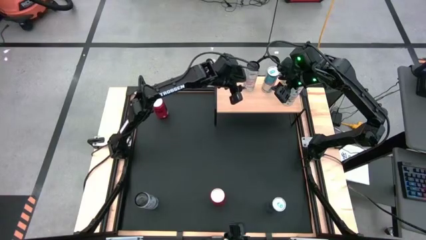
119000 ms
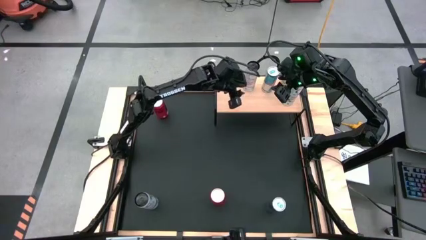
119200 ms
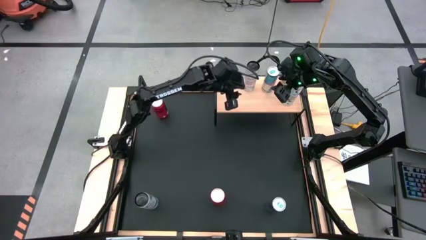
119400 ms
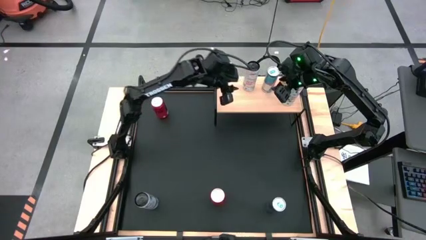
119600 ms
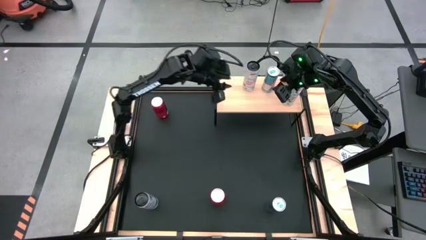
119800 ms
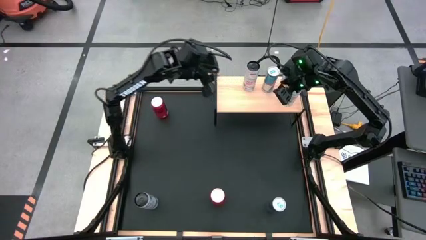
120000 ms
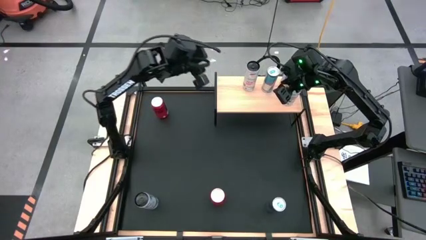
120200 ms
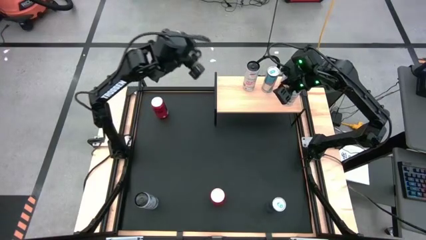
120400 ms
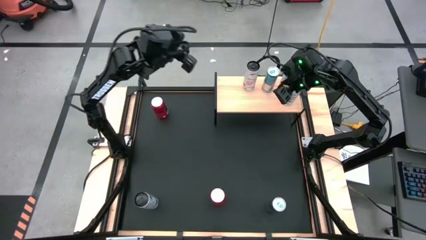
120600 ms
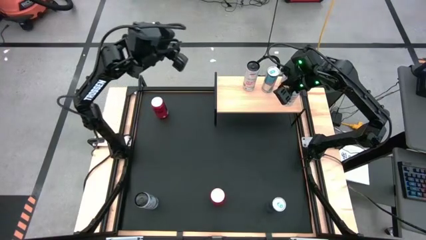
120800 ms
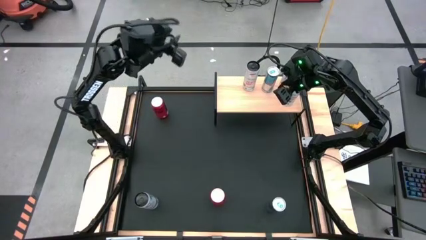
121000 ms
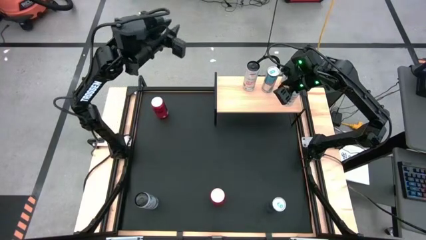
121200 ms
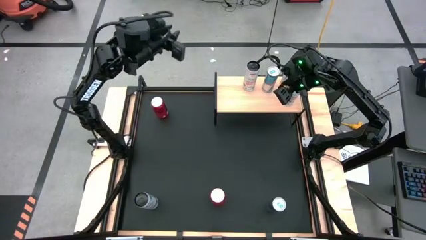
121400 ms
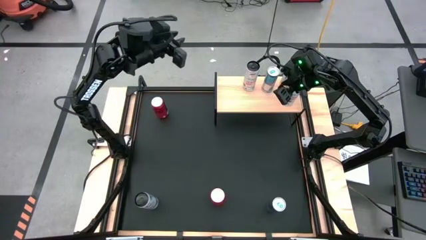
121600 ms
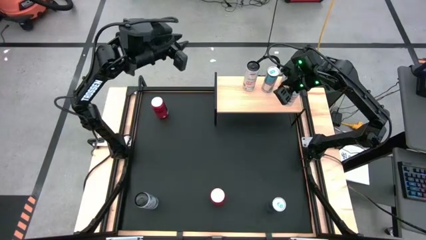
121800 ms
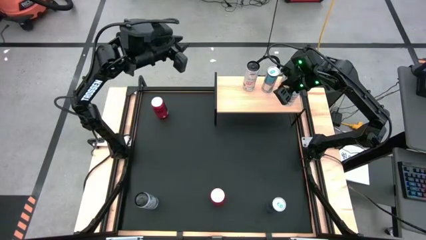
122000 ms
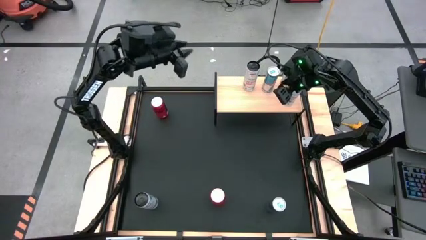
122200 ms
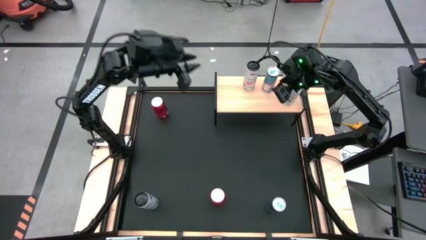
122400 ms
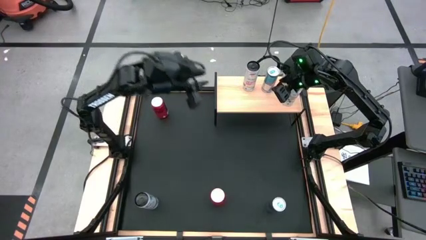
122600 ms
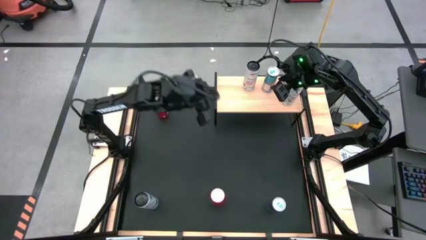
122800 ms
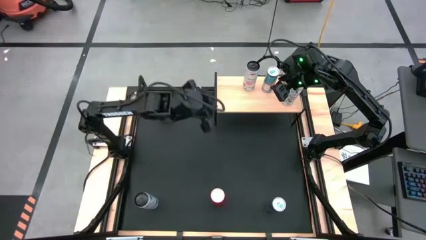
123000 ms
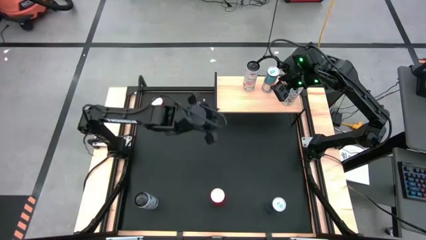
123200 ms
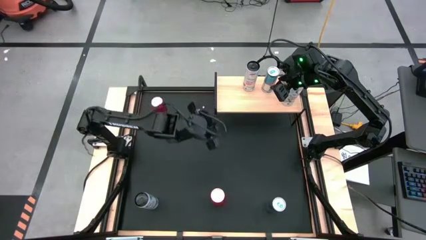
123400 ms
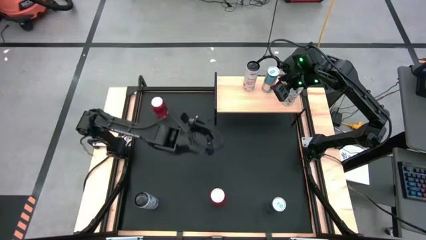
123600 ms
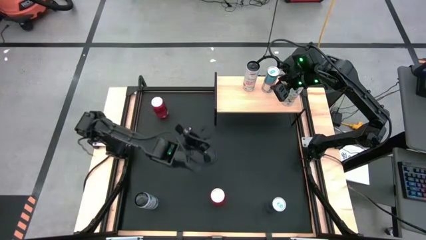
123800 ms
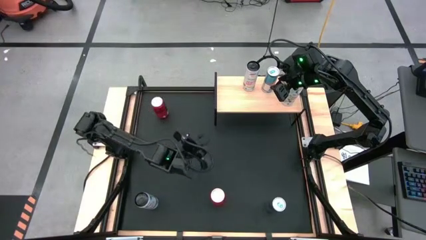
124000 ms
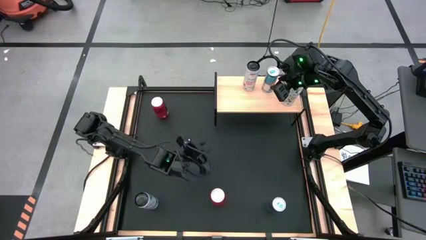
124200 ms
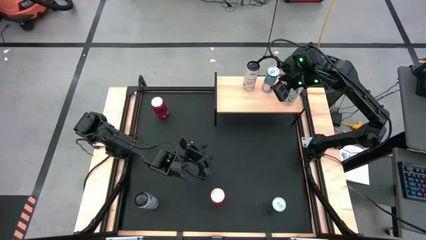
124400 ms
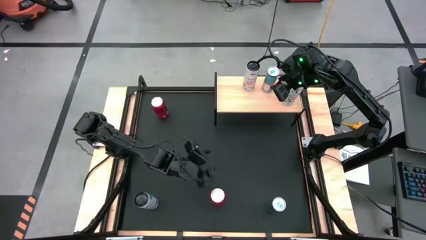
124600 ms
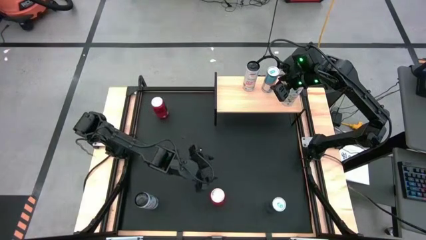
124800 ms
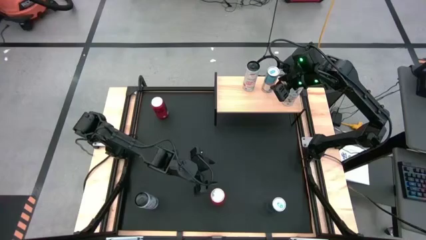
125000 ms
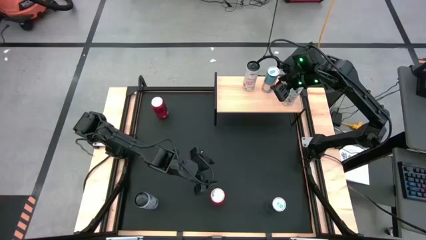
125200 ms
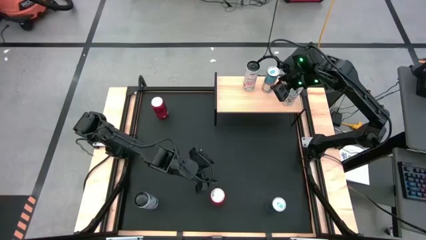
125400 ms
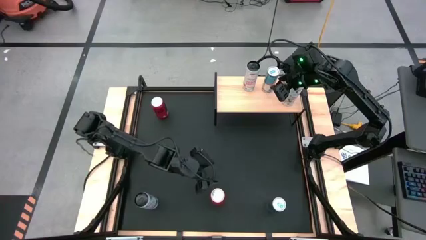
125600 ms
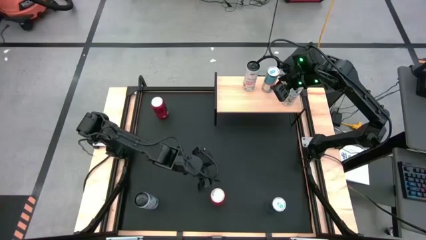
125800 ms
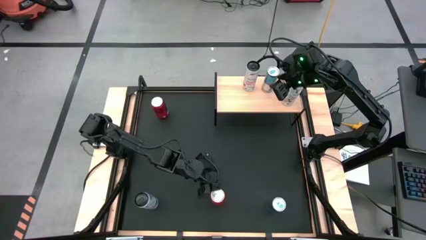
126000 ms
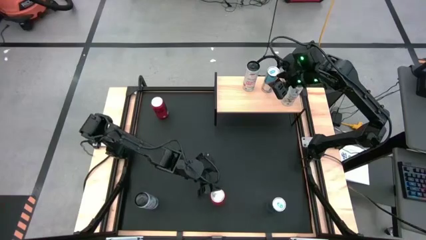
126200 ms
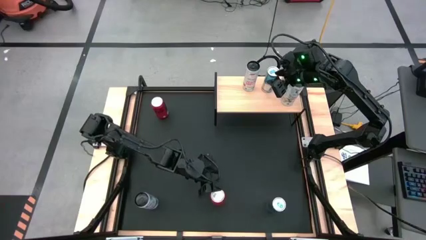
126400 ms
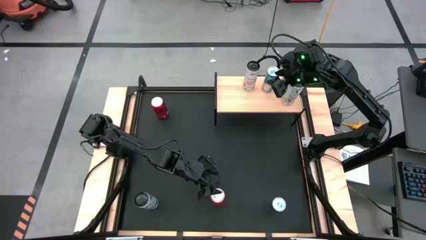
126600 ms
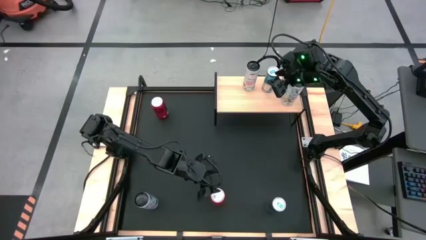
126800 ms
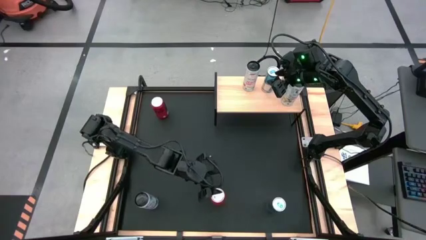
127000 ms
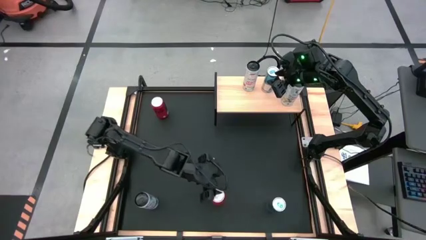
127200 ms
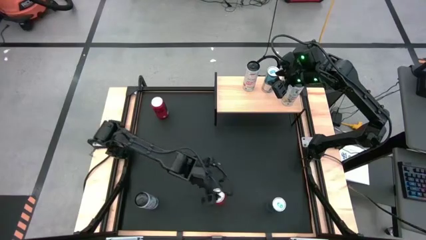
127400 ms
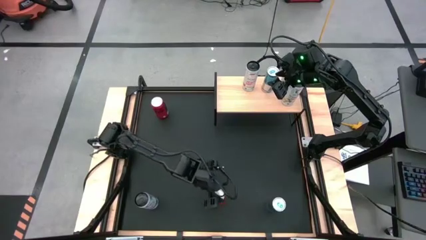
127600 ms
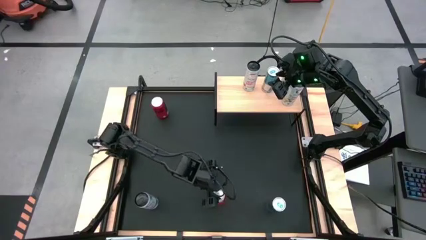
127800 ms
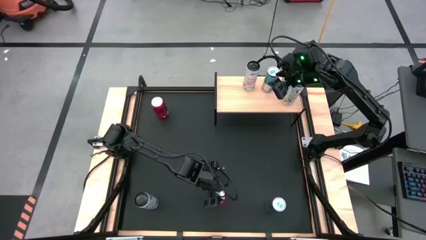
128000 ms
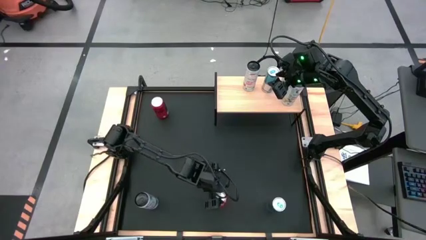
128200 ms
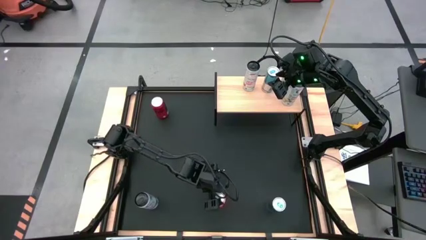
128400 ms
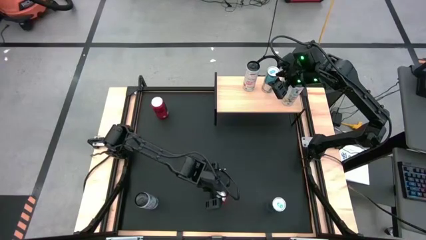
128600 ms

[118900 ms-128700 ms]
Task: Place canned beverage on shelf
Put the bottom red soda can on the shelf

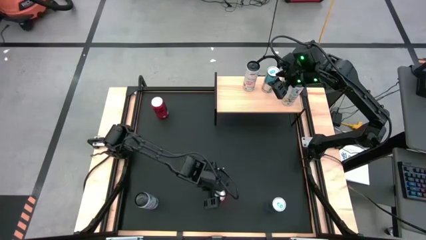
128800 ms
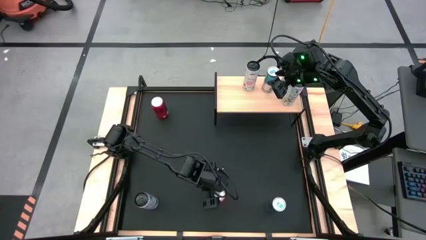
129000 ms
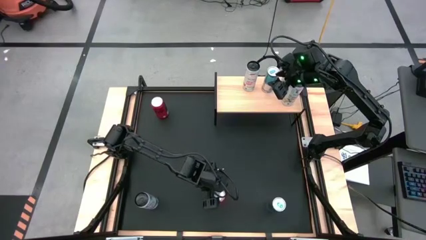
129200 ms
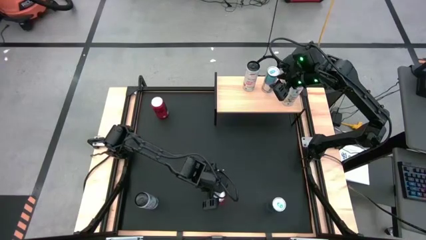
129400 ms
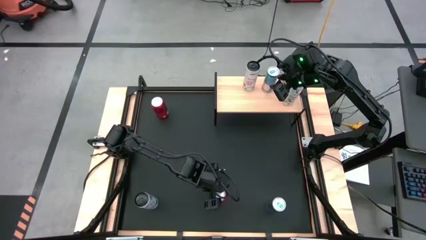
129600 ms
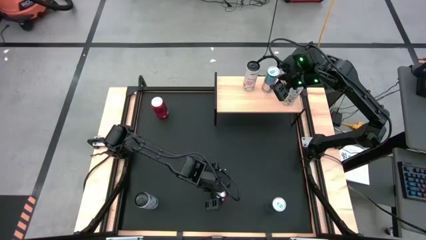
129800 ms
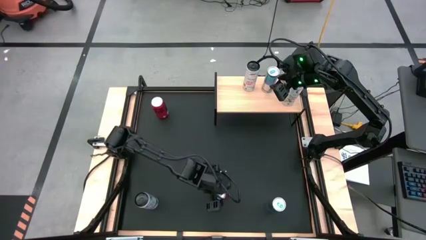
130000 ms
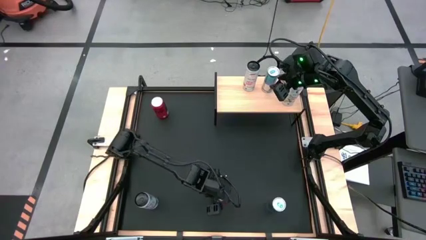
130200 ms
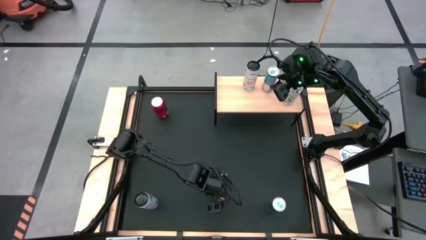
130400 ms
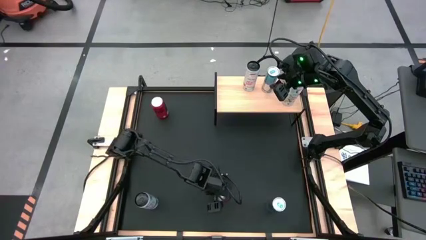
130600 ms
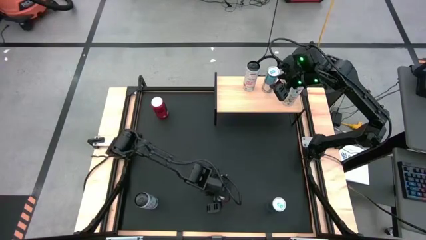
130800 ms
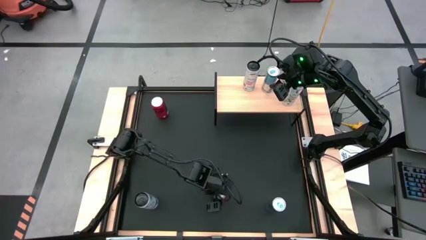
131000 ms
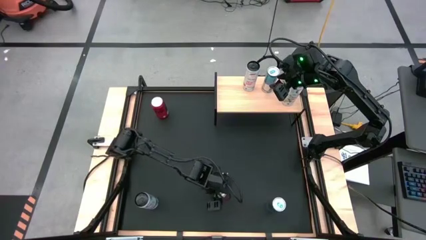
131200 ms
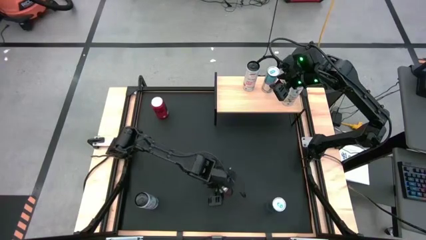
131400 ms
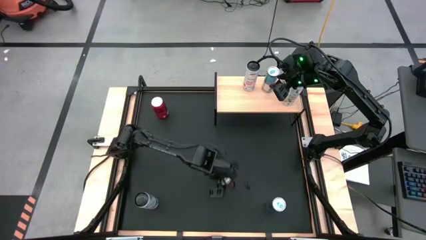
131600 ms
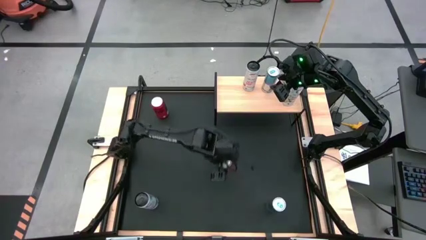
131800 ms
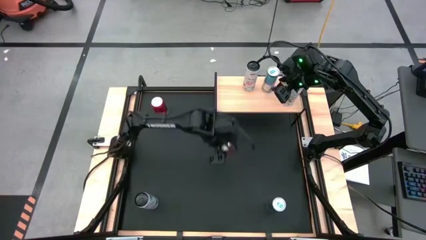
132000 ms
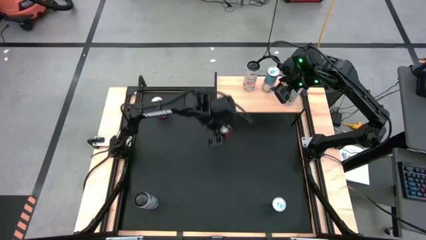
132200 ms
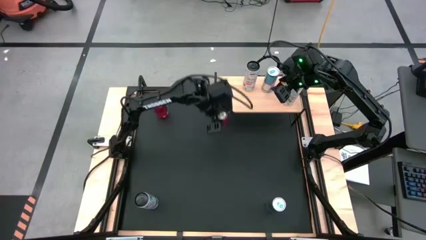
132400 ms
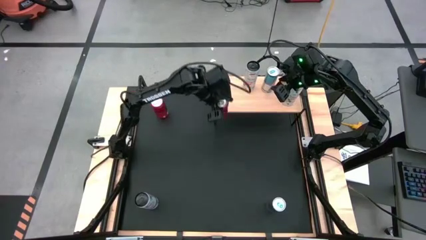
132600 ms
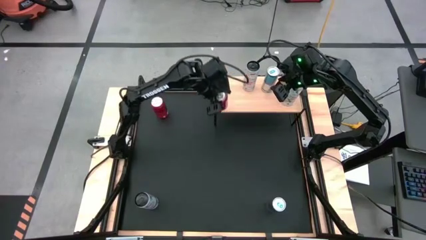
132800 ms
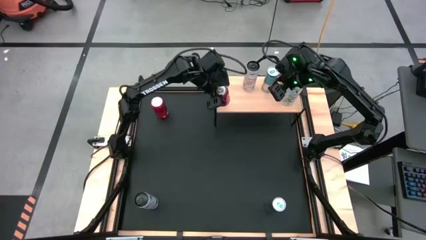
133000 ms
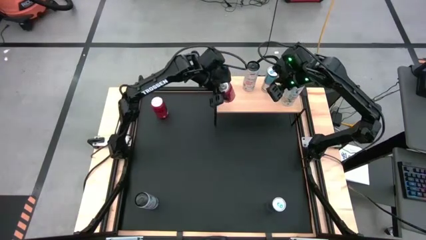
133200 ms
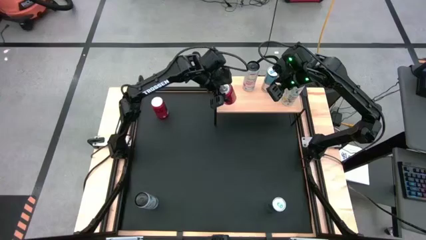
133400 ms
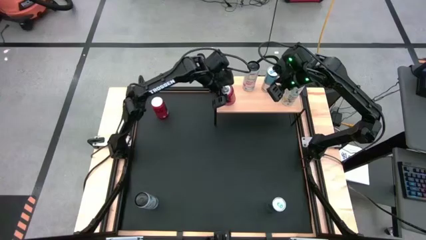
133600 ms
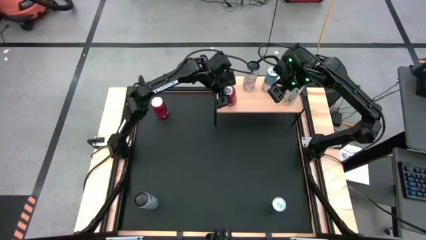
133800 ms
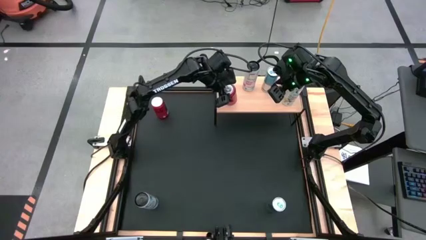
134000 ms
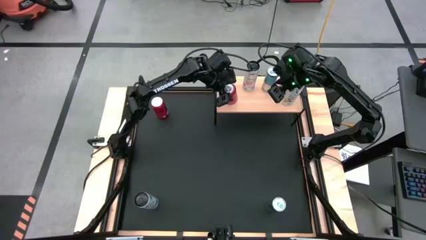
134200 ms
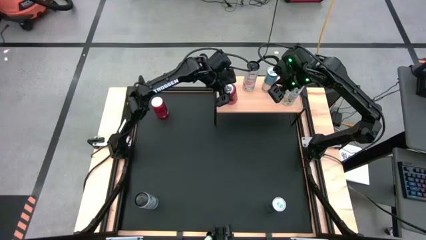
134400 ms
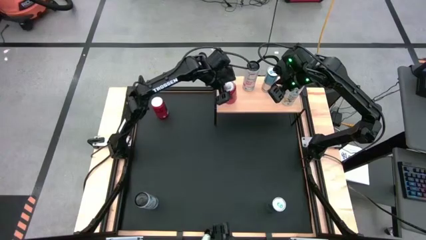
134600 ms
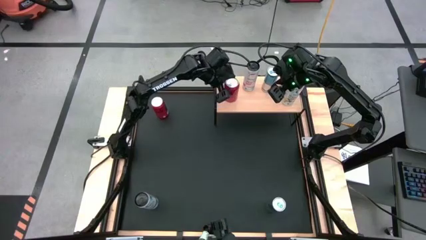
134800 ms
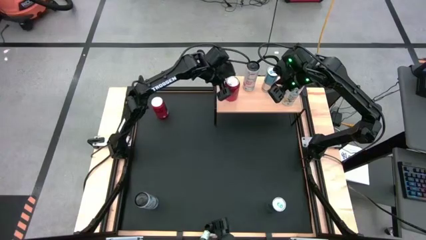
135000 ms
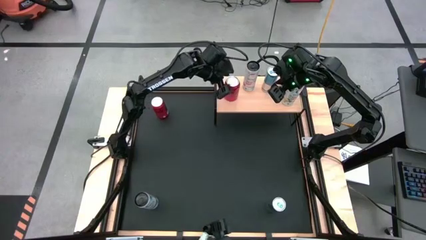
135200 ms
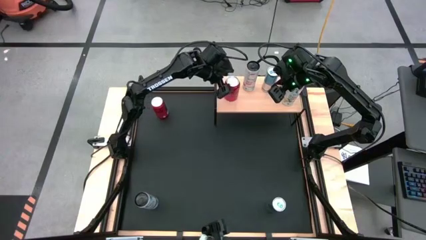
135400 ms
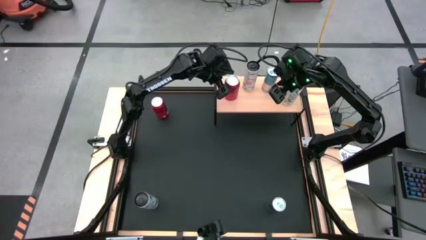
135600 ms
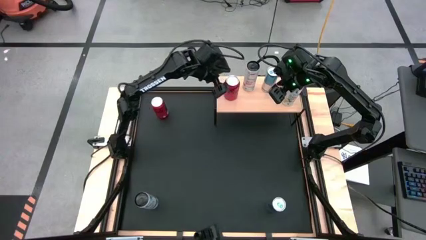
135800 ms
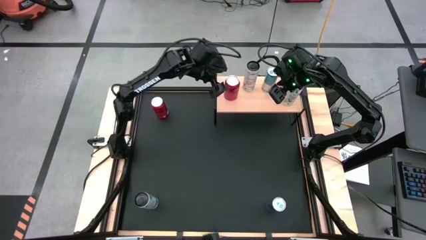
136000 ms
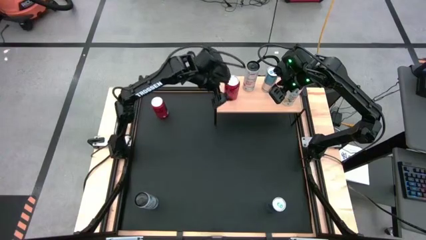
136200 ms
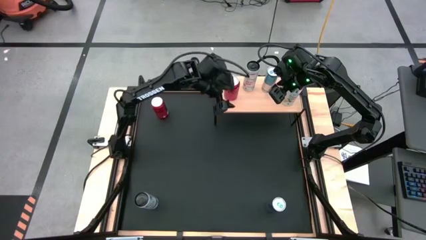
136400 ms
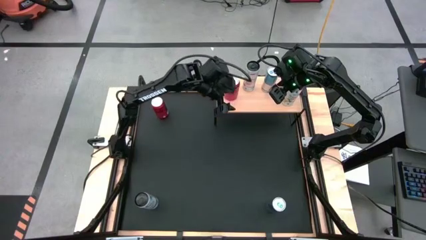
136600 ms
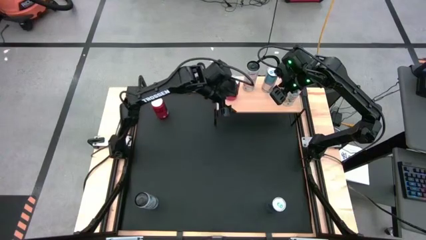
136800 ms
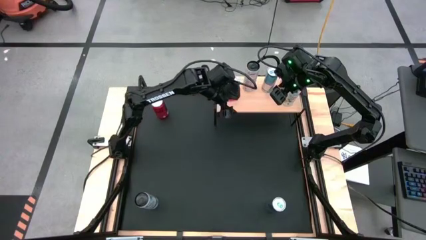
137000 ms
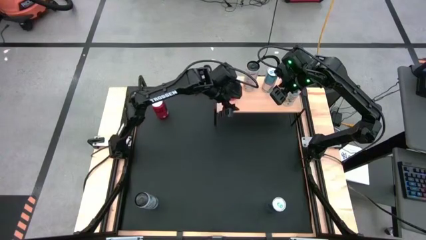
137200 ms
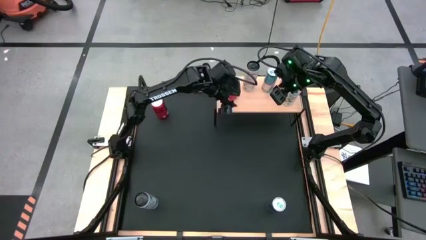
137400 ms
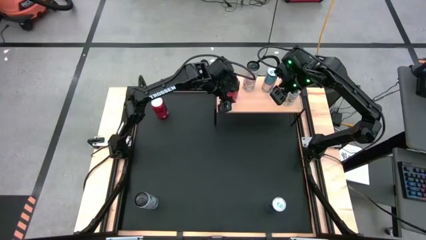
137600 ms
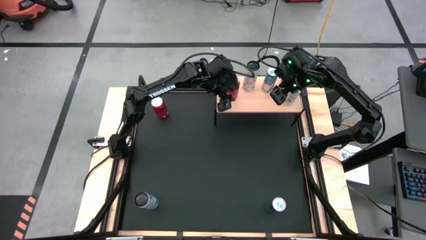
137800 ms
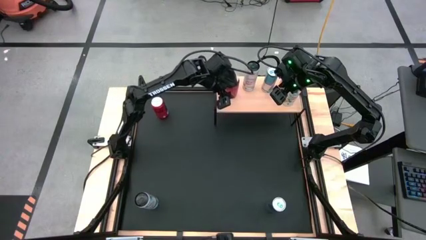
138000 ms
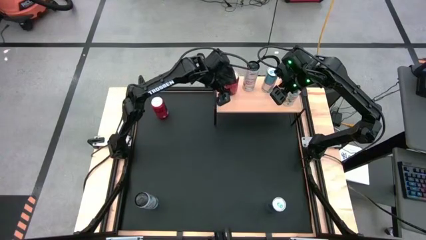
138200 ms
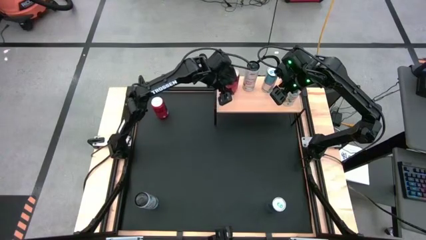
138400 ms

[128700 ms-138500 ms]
Put the bottom red soda can on the shelf
